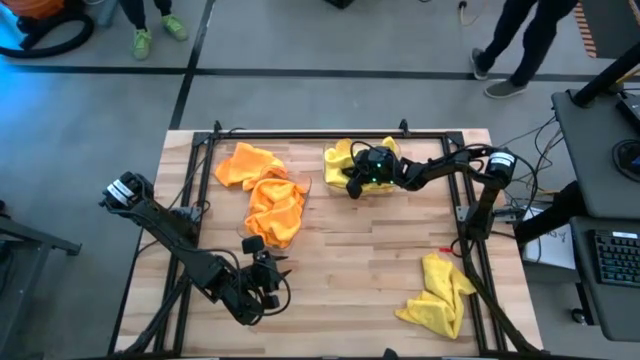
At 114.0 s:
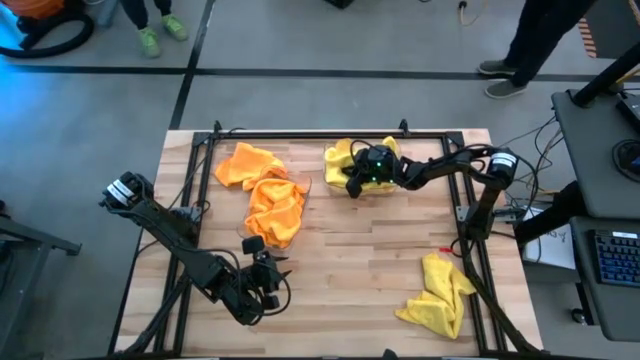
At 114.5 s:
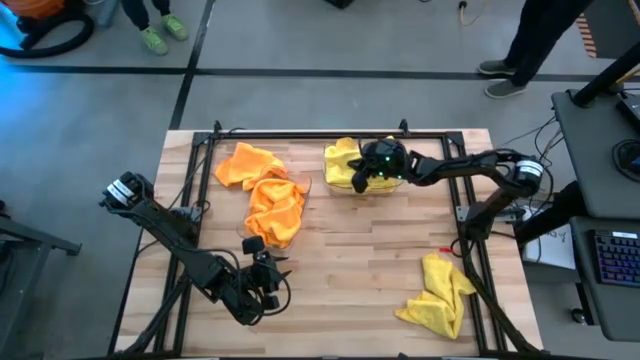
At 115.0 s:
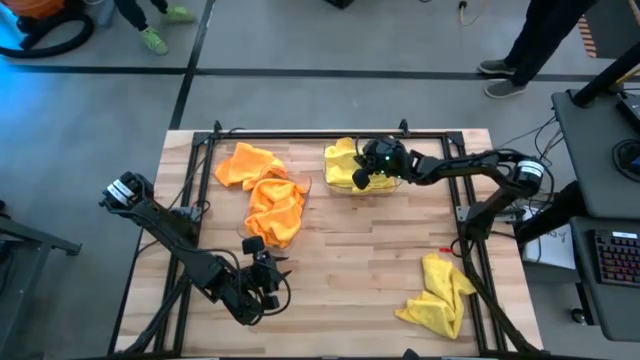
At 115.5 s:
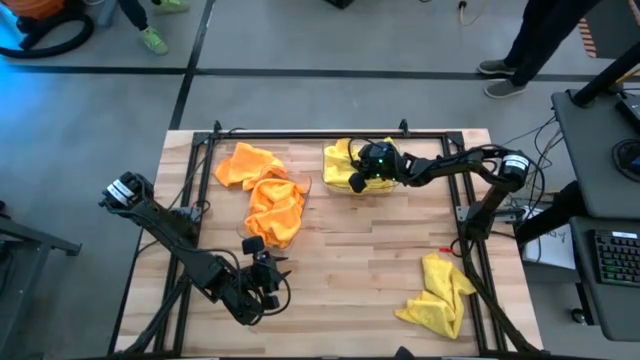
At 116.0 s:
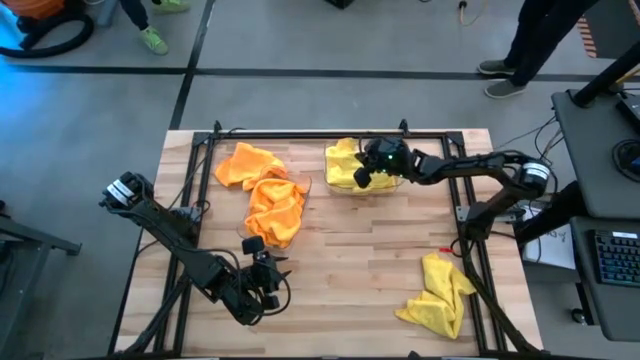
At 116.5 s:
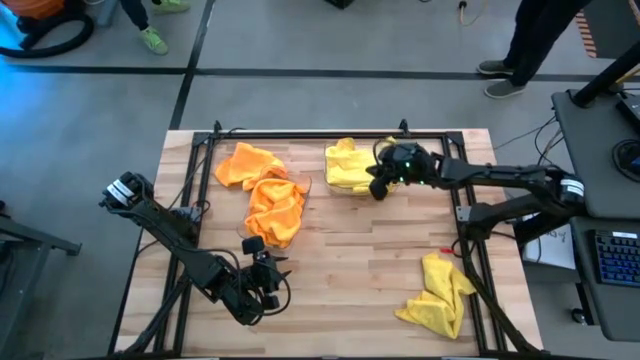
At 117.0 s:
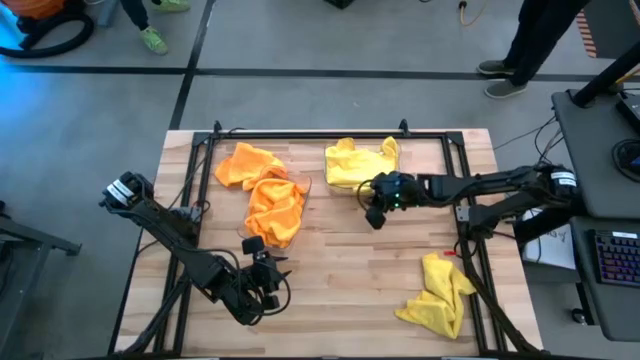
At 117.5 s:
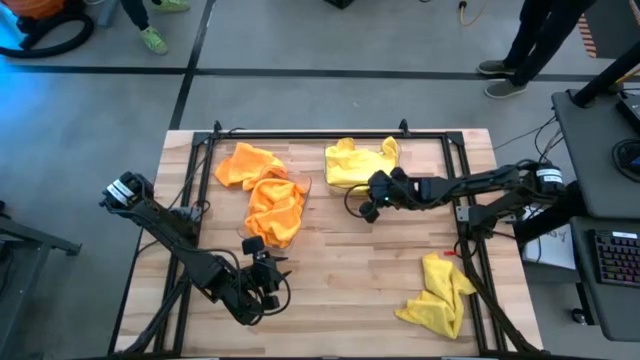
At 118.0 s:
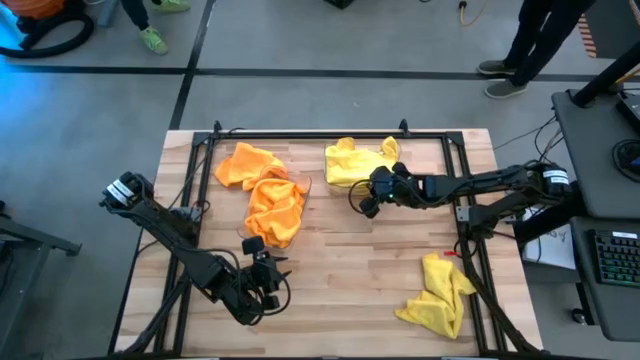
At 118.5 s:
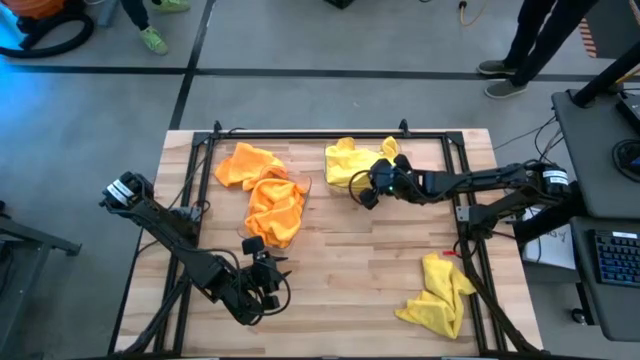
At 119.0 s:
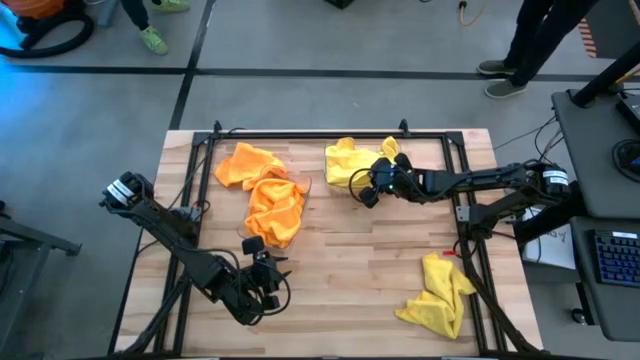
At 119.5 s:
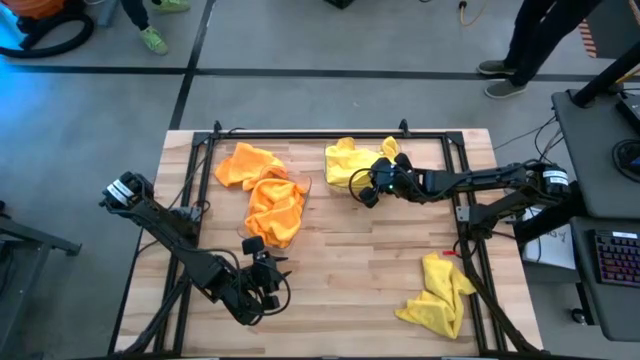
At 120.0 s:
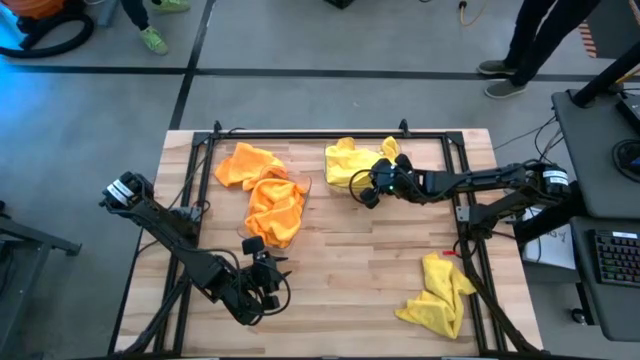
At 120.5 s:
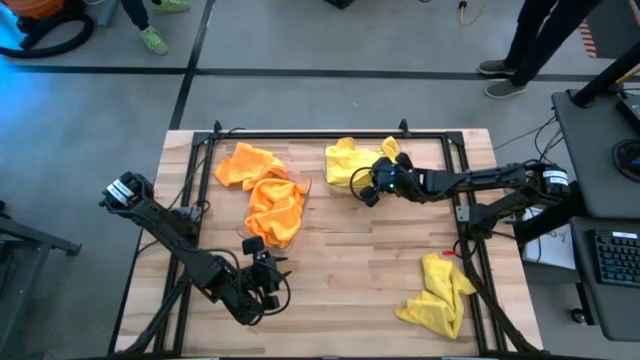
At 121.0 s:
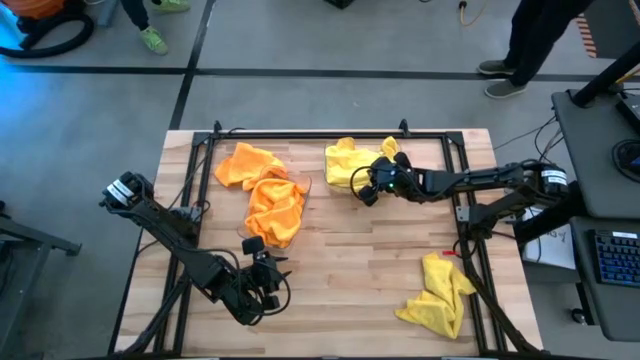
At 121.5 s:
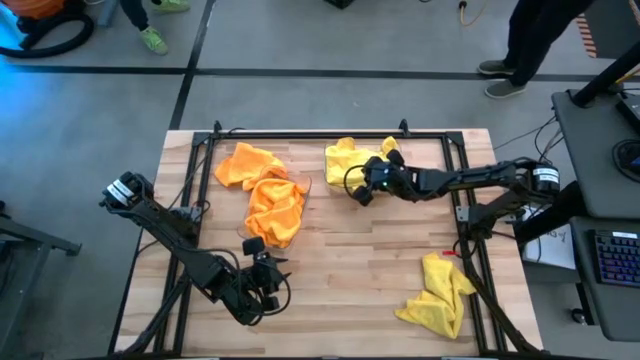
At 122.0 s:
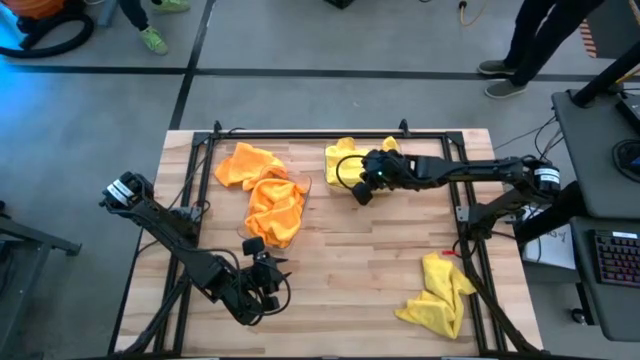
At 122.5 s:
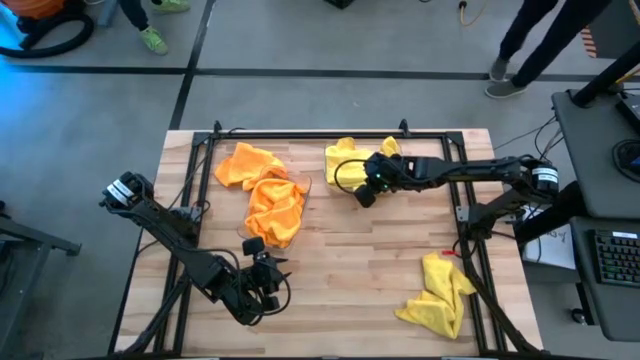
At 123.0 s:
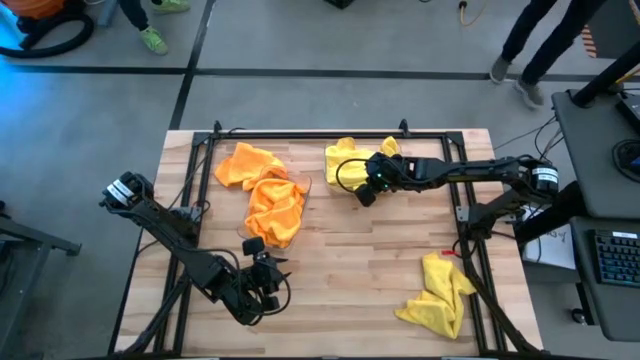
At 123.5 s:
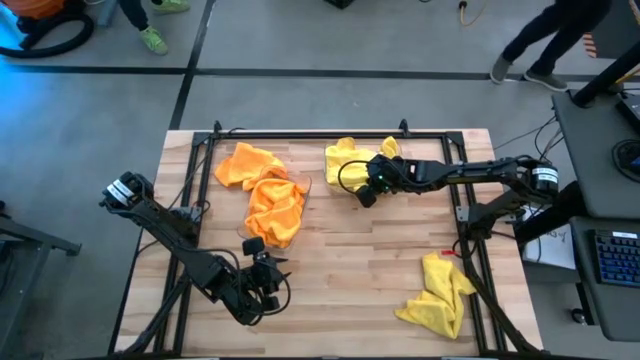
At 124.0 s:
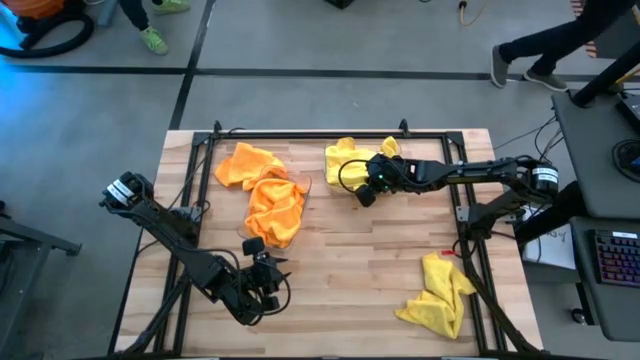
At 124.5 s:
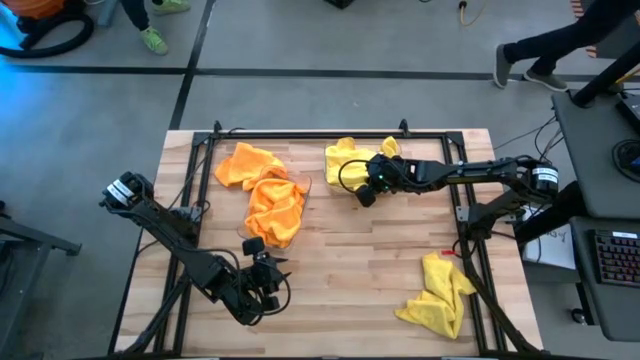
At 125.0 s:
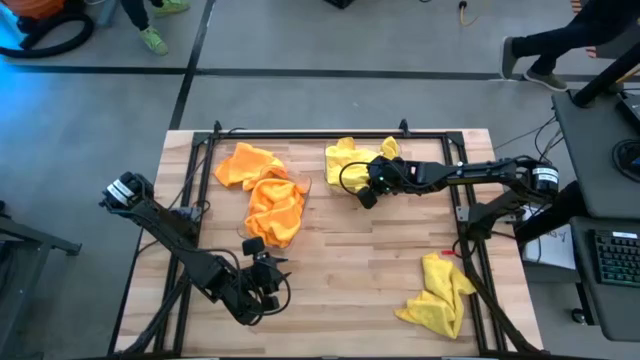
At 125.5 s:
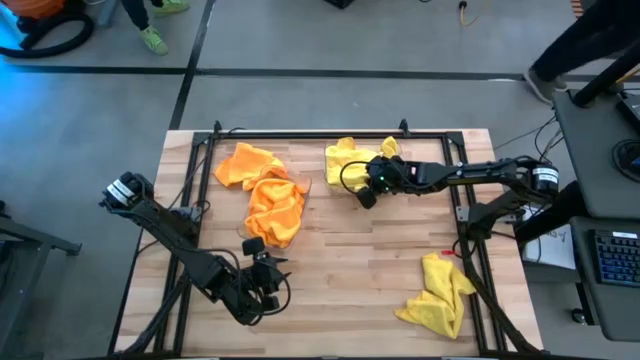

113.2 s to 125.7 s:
Task: Sort microfiber towel by color & place in baskets
Put the yellow microfiber towel into the right transparent bin

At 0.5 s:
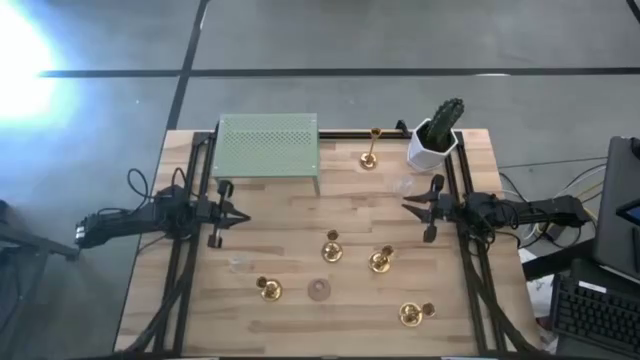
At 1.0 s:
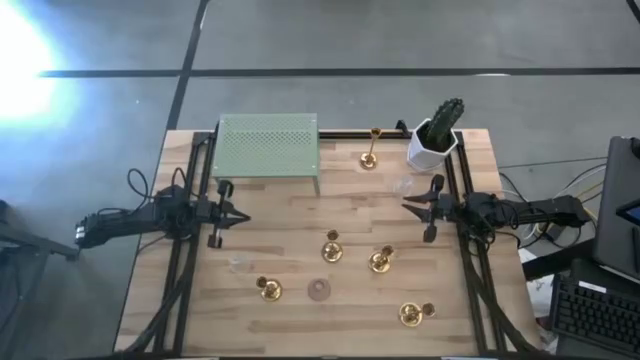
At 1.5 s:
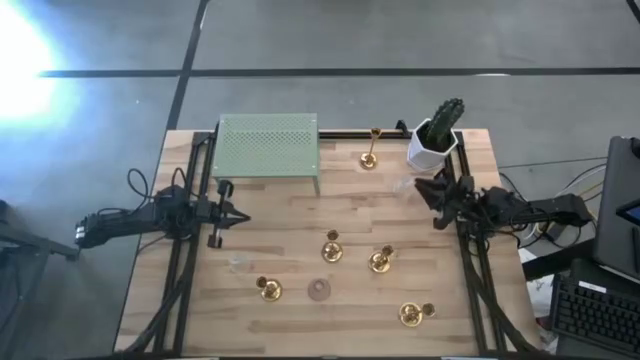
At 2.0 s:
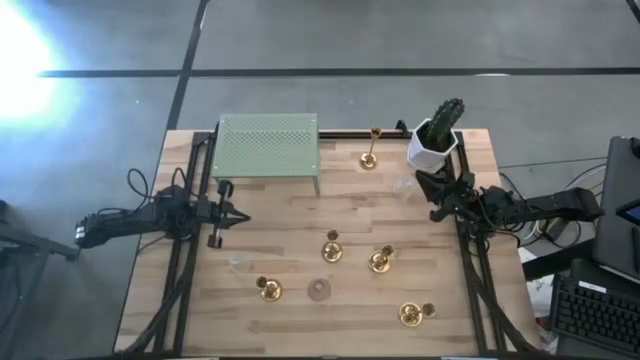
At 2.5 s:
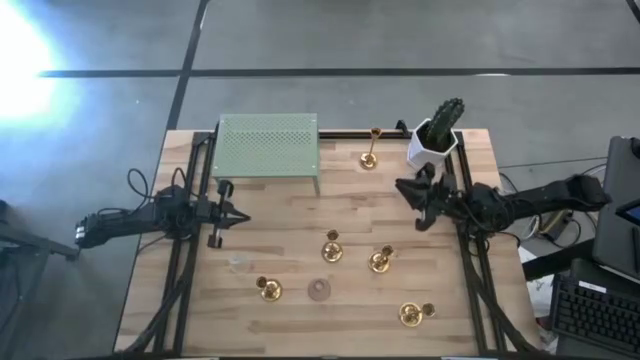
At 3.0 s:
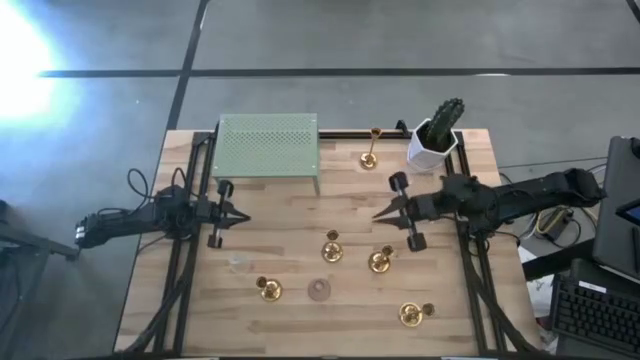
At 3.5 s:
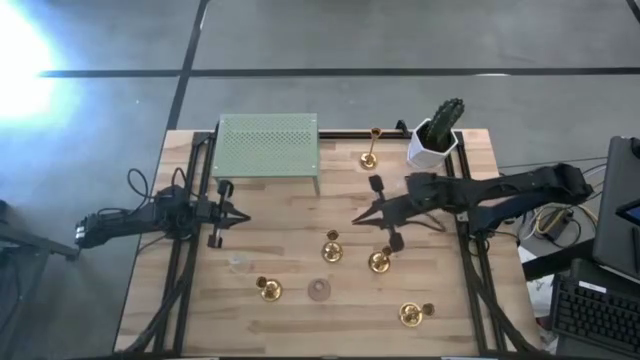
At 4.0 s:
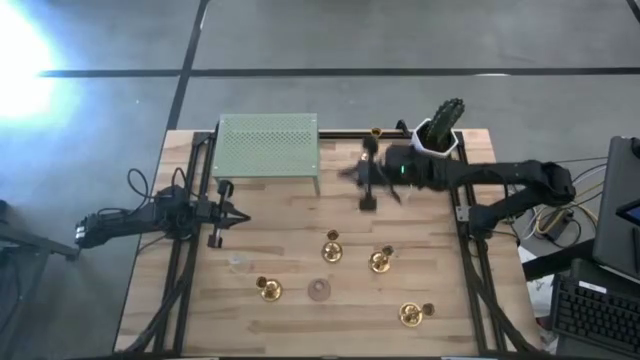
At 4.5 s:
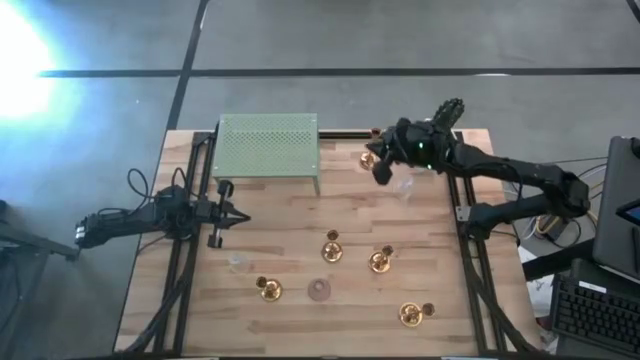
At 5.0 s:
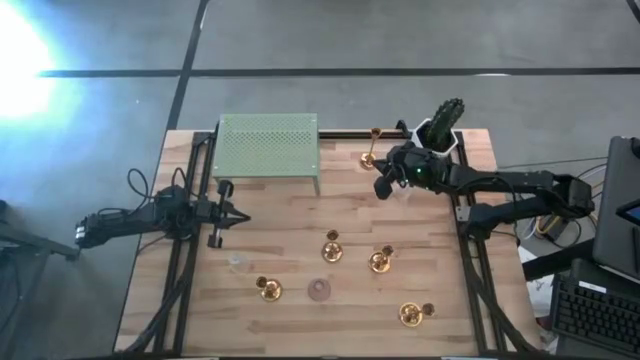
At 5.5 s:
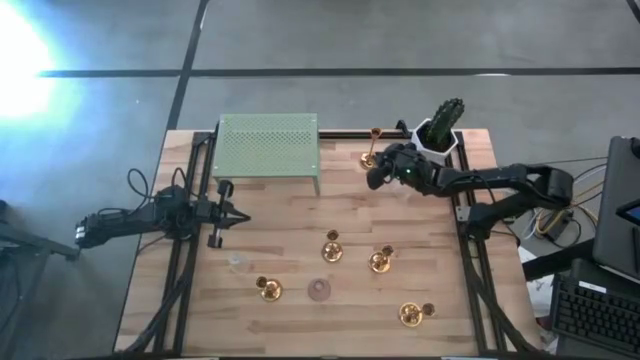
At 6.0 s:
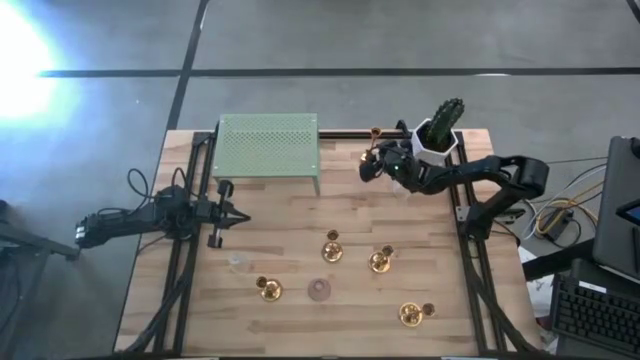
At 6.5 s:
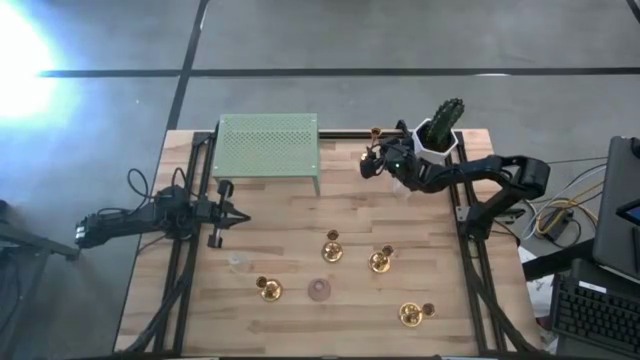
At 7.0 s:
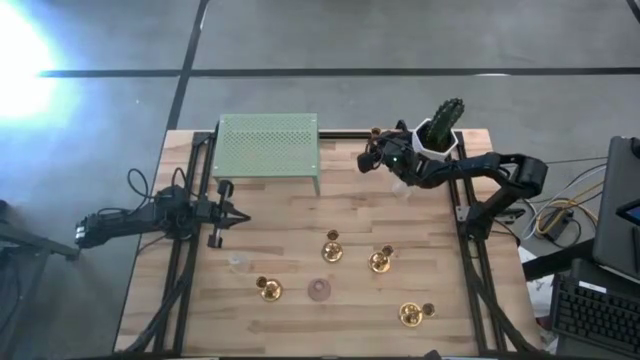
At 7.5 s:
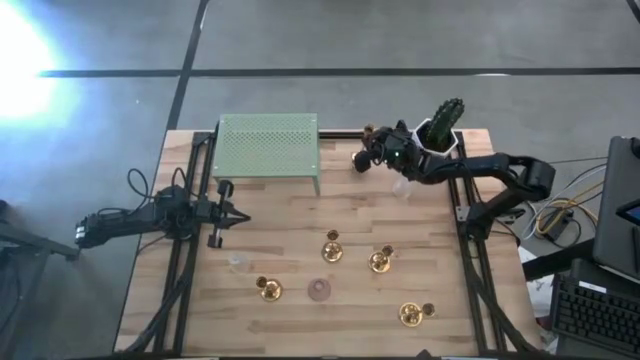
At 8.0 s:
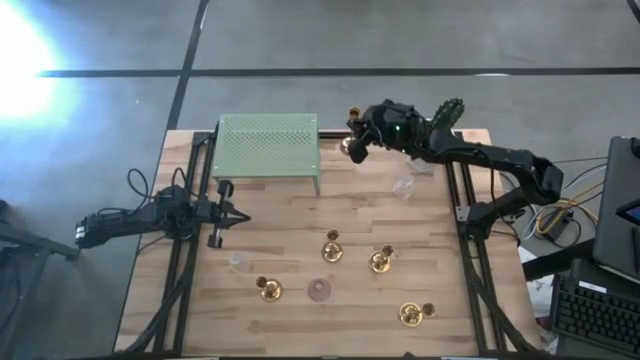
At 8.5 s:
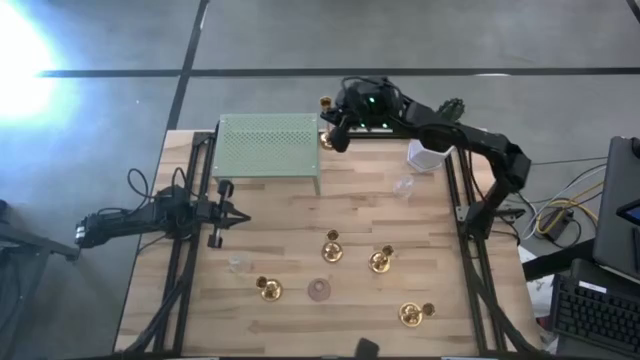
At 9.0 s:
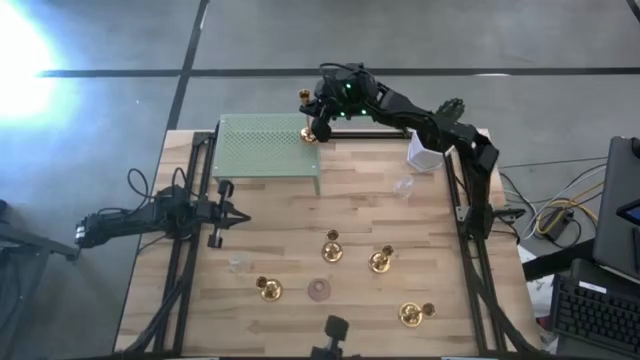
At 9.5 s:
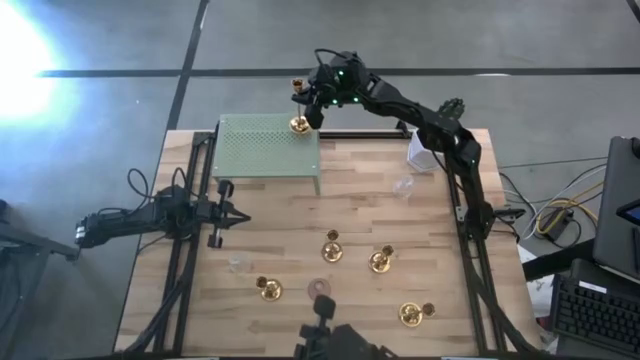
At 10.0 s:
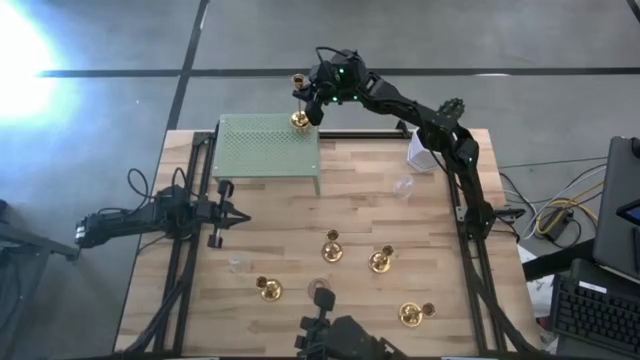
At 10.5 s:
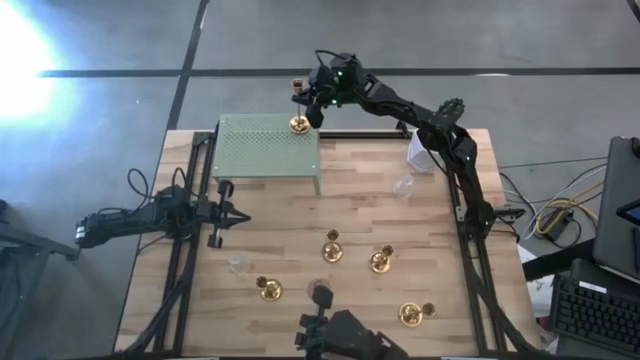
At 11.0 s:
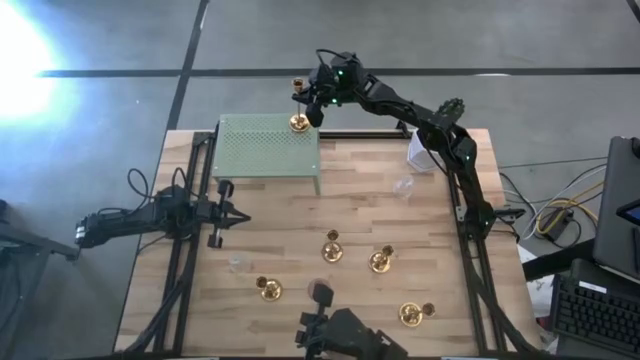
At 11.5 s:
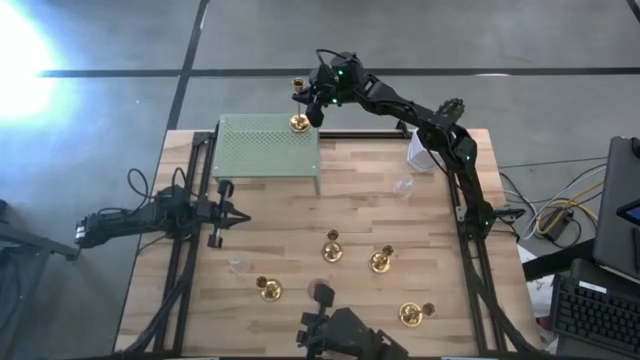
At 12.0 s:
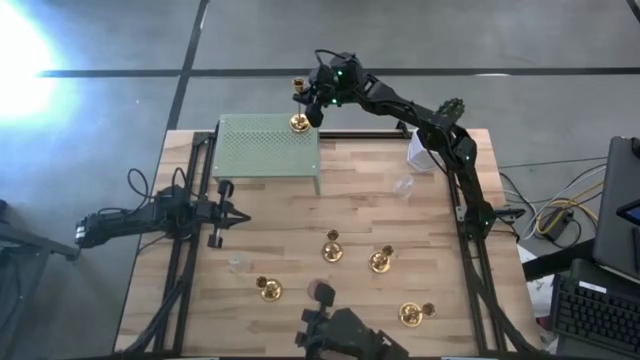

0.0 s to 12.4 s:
Task: Pick & Place candle stick holders
Put the golden candle holder on the shelf
